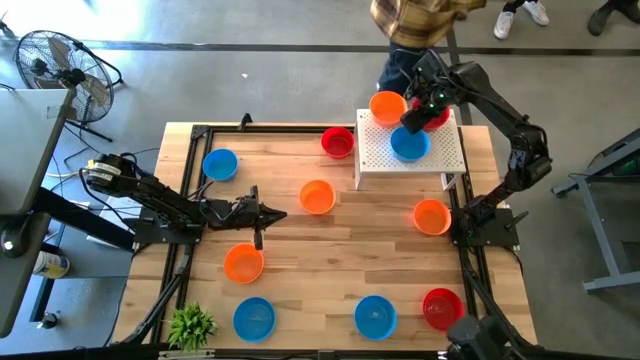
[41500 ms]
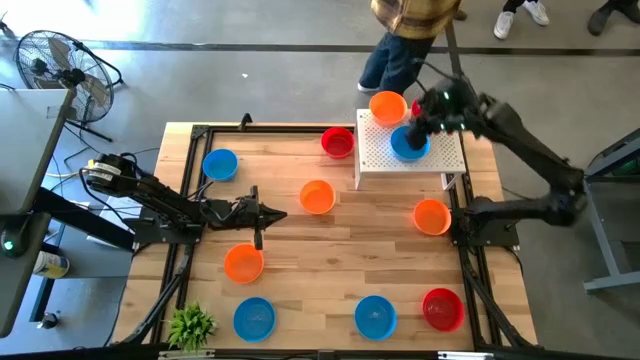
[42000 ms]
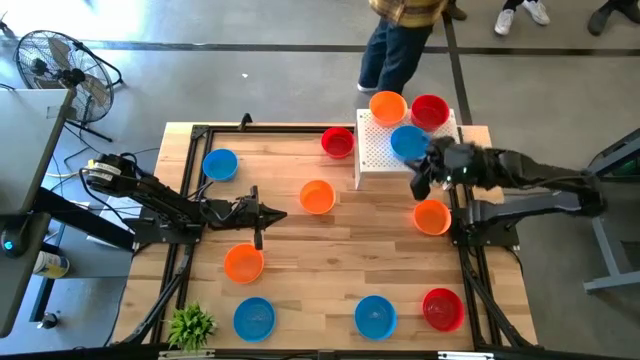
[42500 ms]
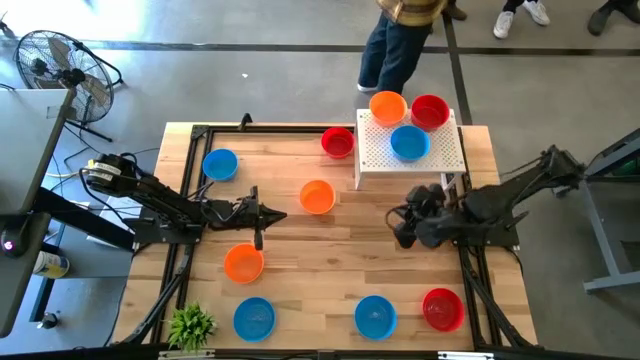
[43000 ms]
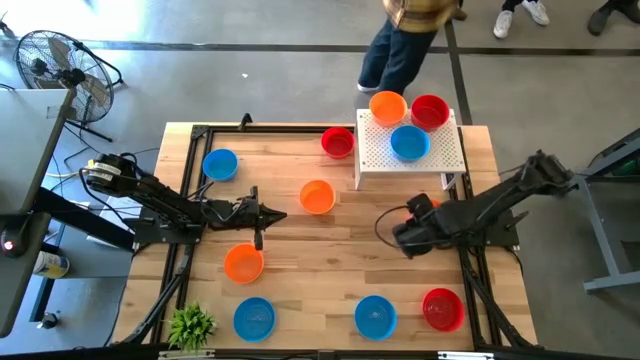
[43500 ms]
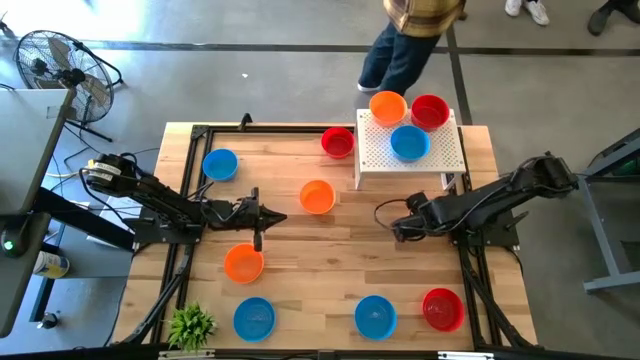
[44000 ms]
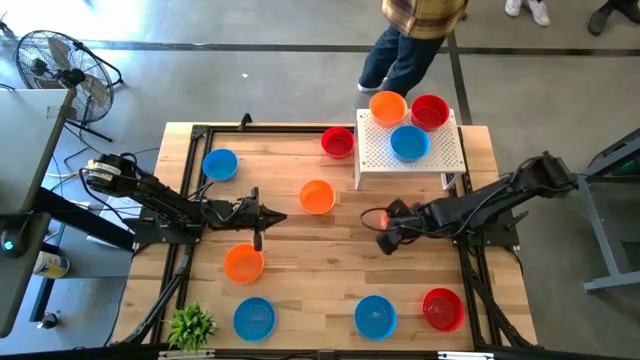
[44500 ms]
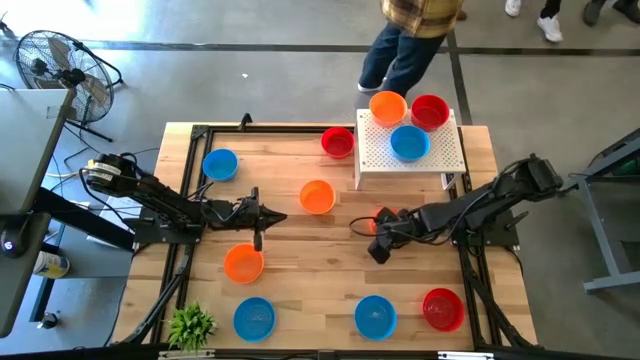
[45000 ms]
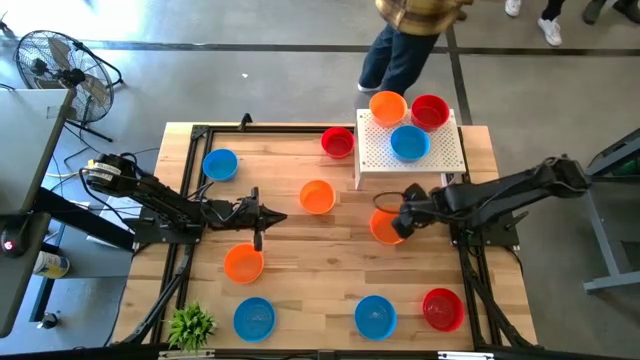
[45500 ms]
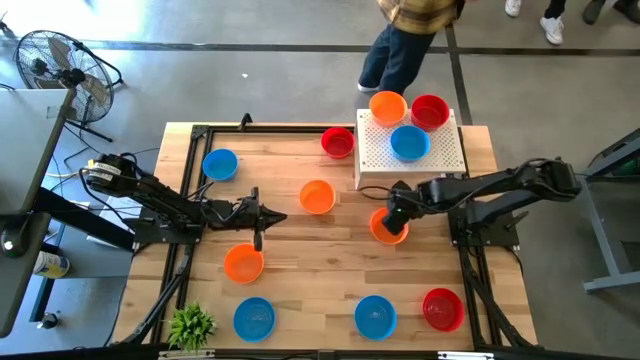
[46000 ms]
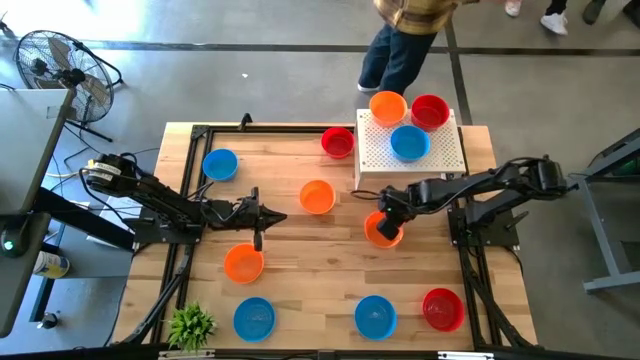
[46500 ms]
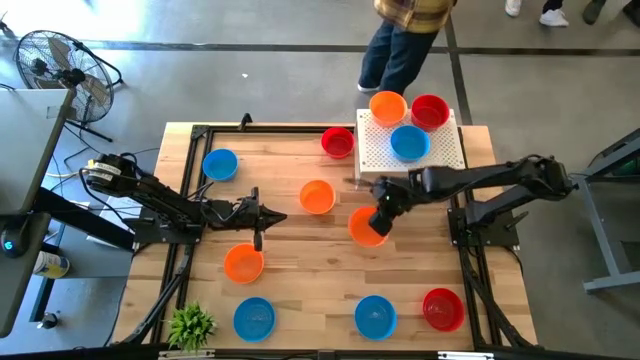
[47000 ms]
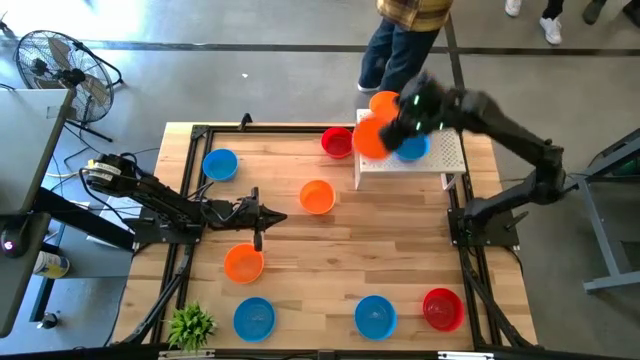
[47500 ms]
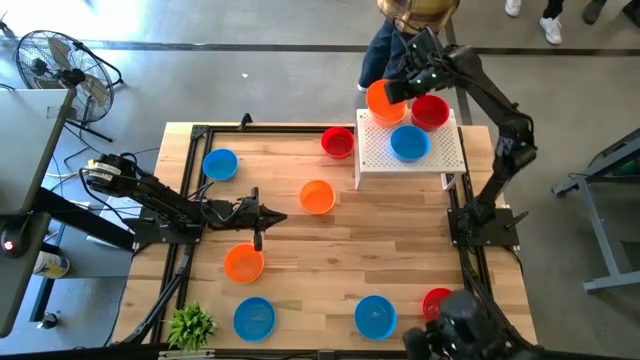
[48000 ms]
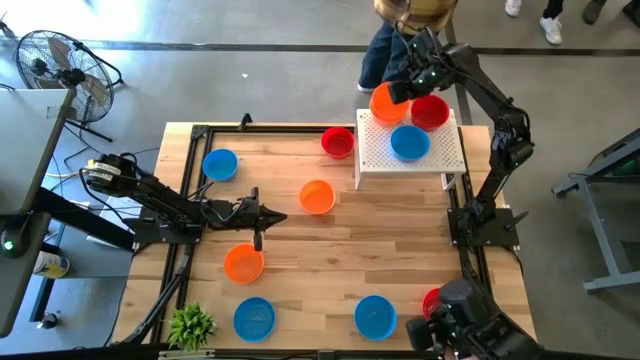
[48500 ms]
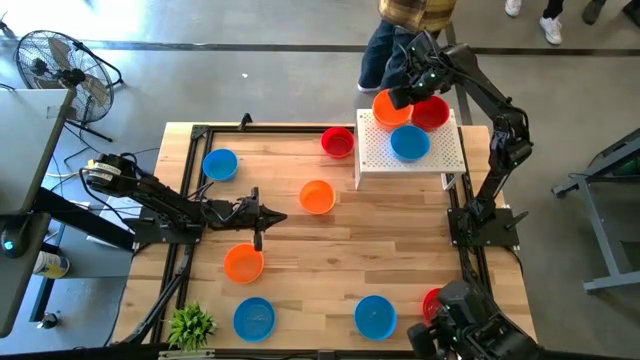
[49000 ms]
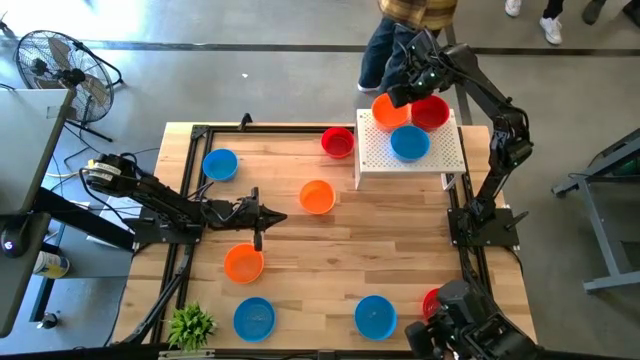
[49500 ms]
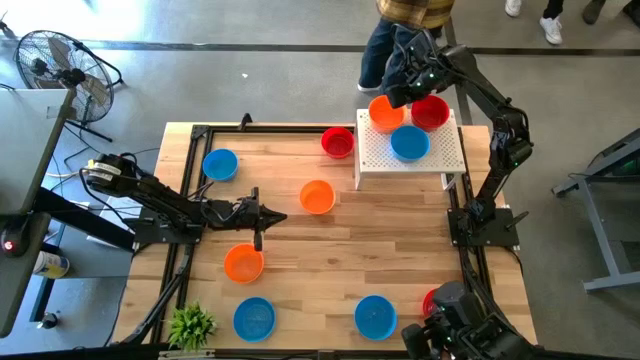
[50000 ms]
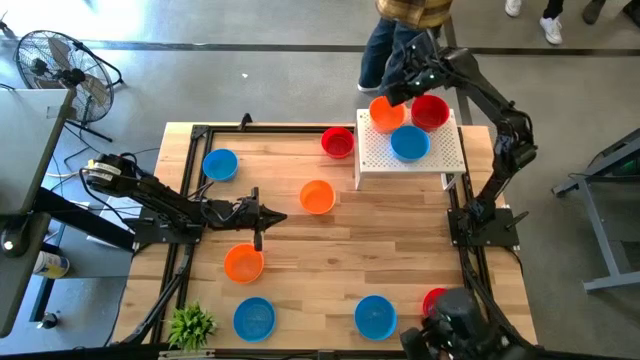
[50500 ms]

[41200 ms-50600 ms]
Task: Pick & Place Mini bowls
Stack the orange bowl on the orange bowl on the shelf

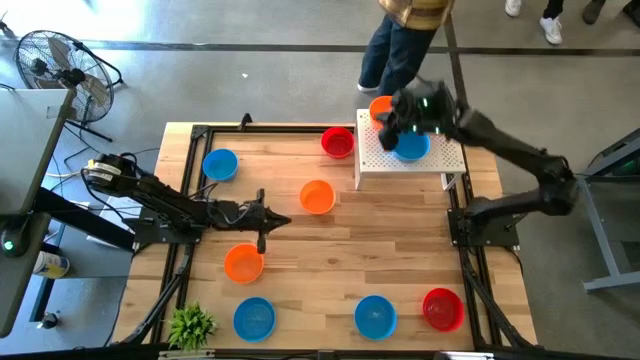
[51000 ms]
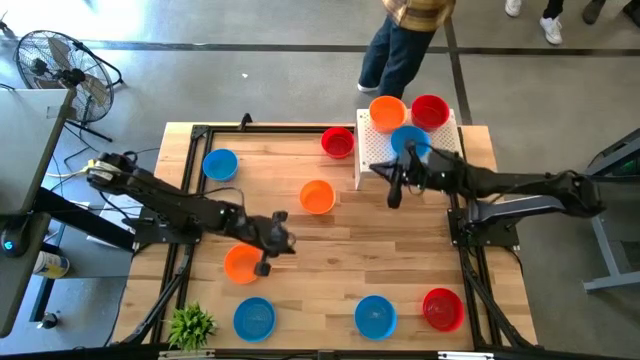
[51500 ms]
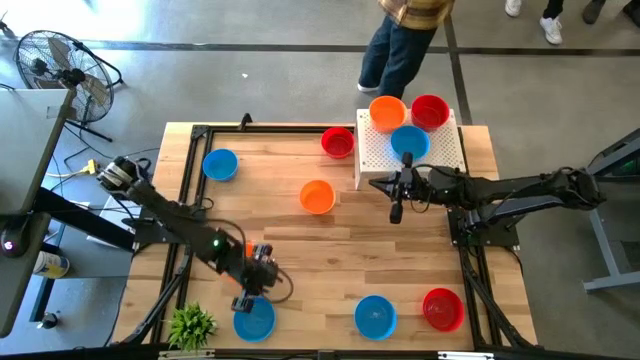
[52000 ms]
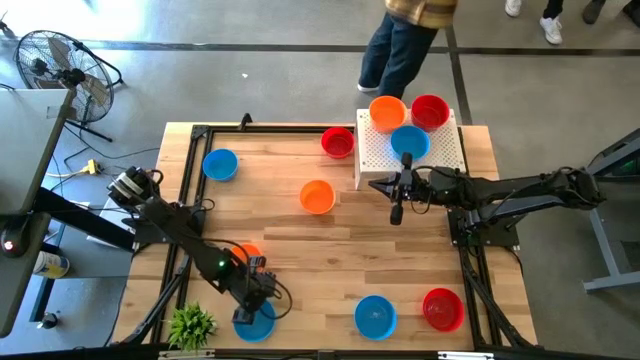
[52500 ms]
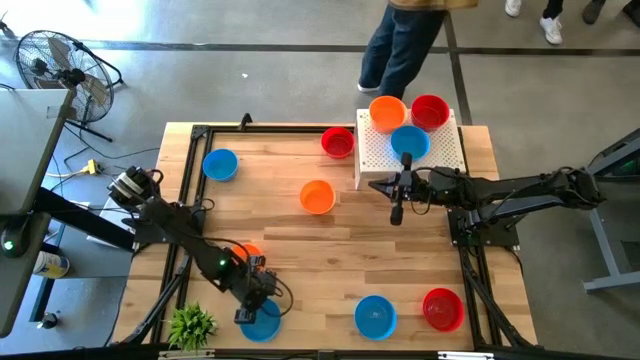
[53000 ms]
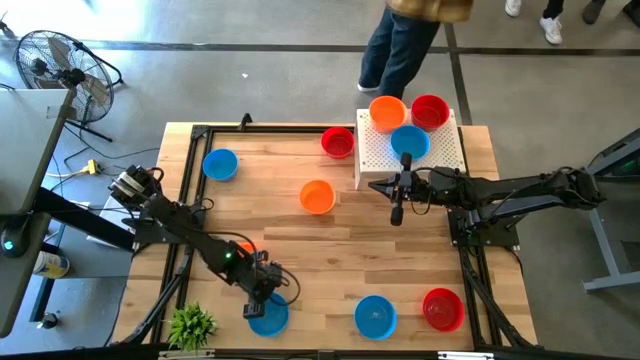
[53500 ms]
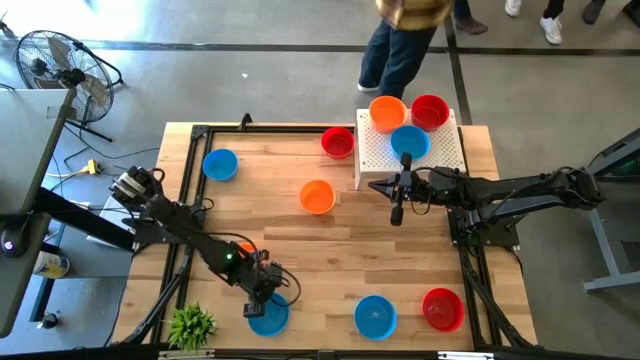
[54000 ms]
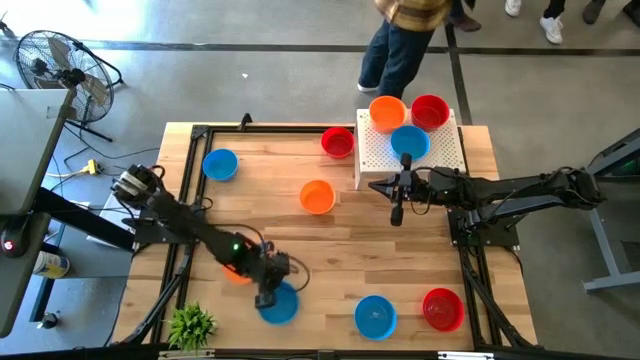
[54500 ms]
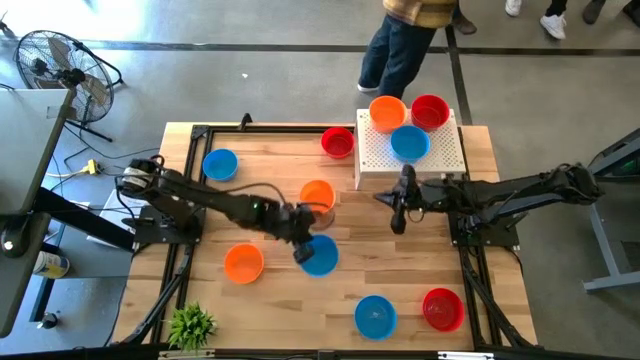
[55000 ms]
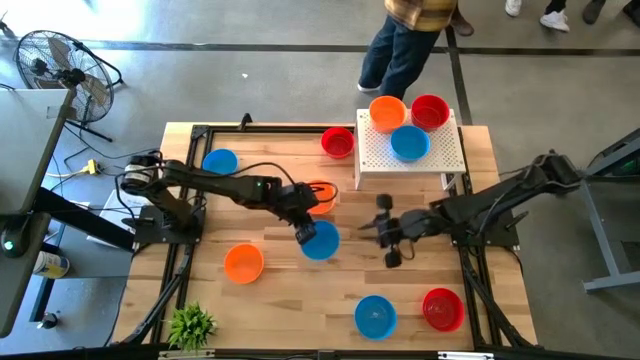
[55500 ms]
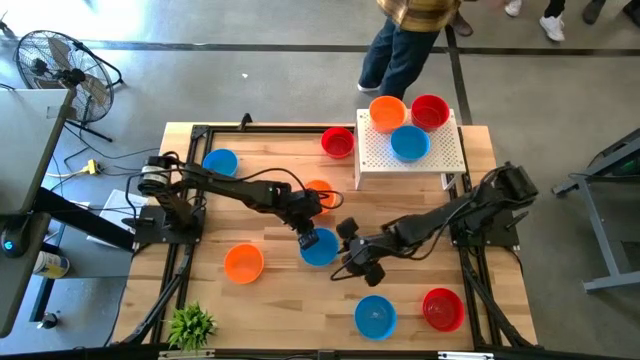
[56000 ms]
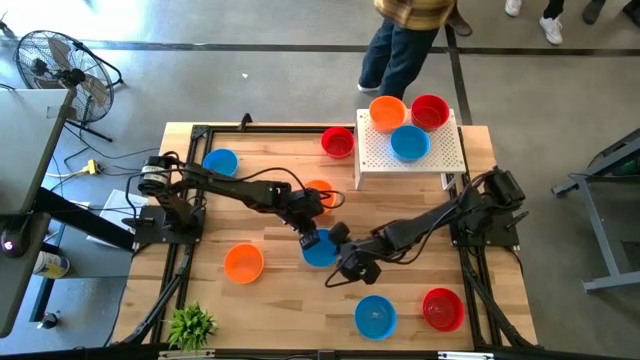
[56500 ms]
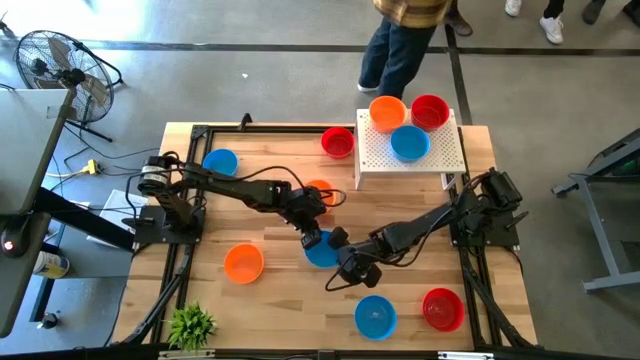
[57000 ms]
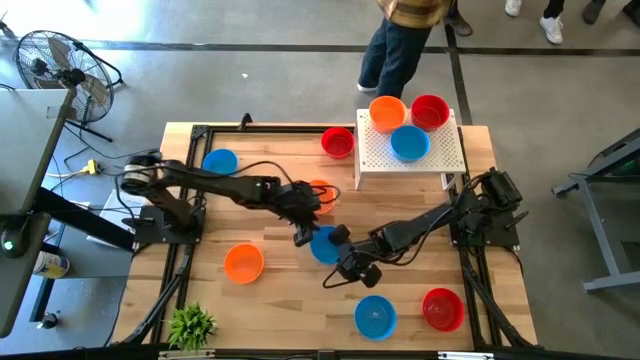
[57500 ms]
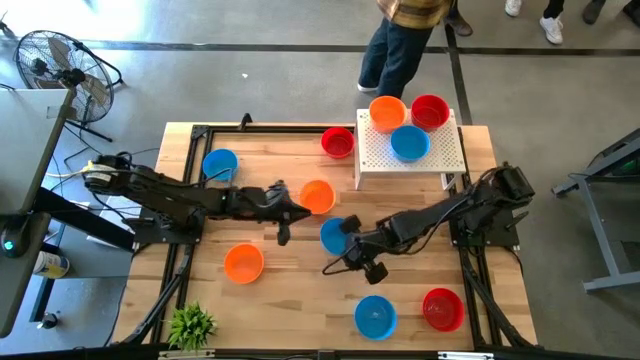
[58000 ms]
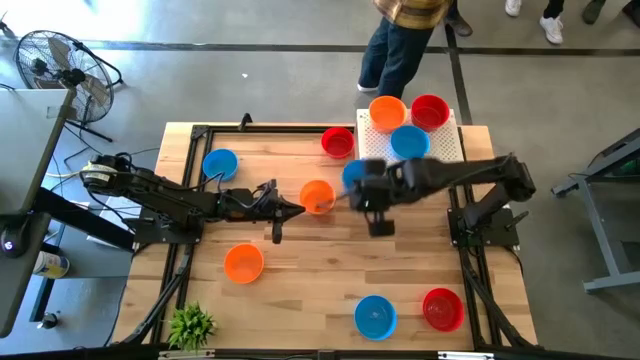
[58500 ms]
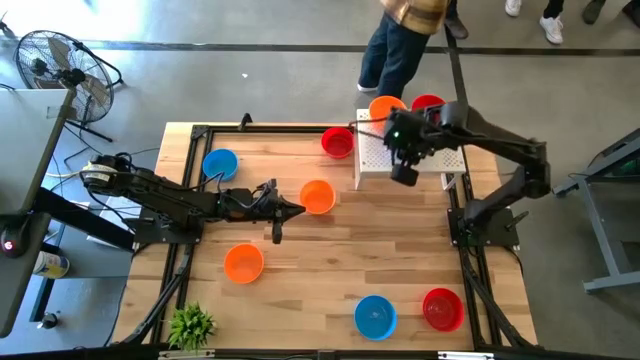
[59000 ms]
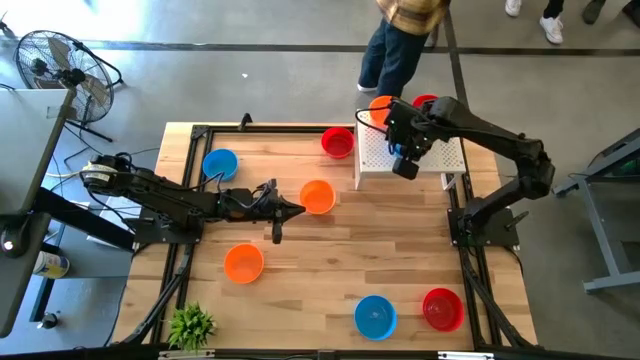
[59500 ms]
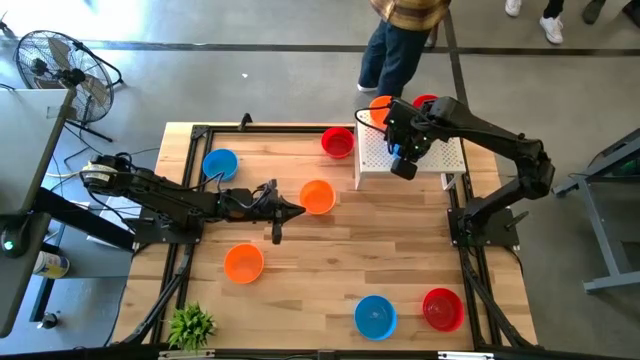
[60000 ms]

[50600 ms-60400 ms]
Stack the blue bowl on the blue bowl on the shelf

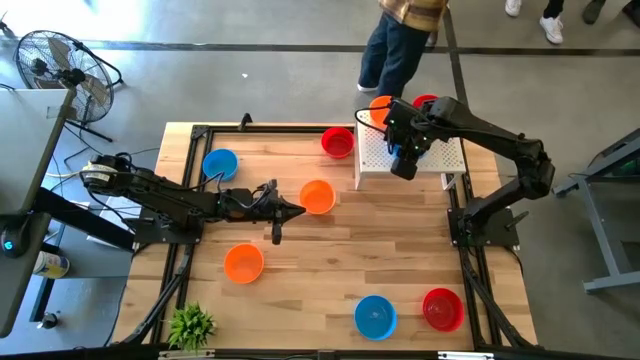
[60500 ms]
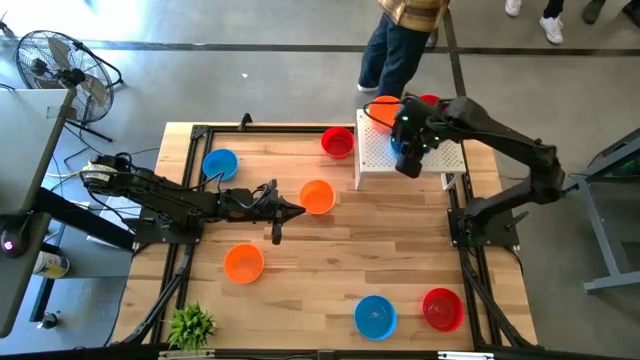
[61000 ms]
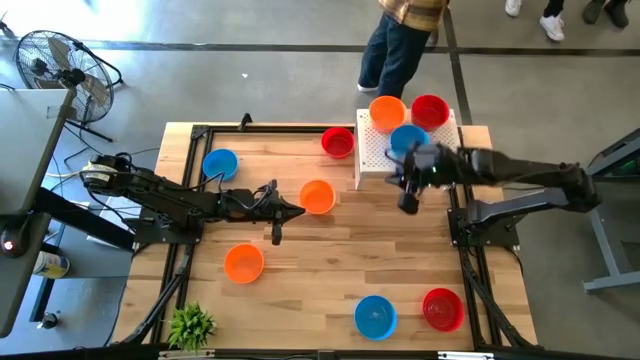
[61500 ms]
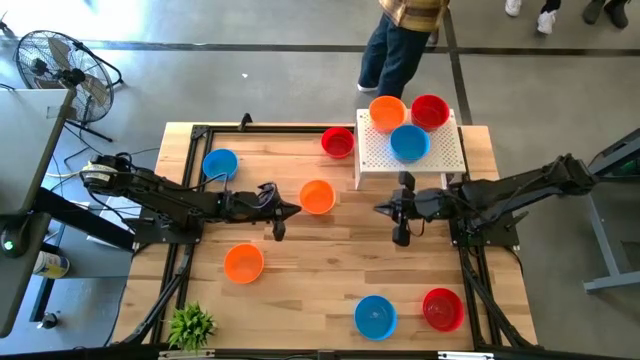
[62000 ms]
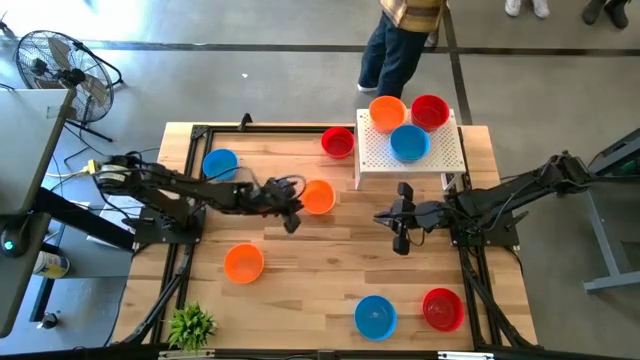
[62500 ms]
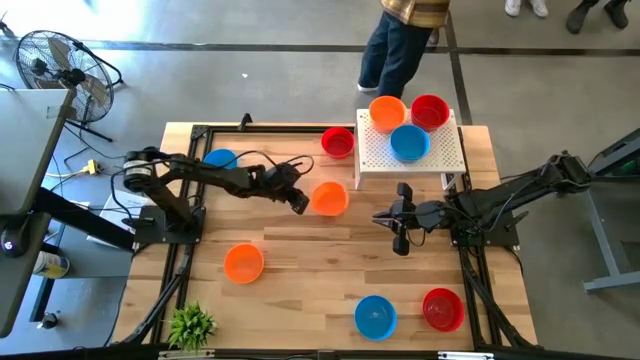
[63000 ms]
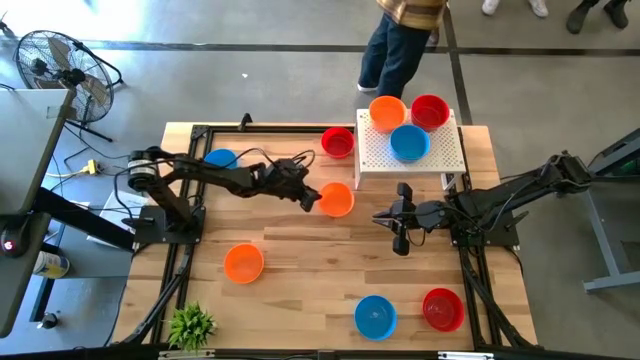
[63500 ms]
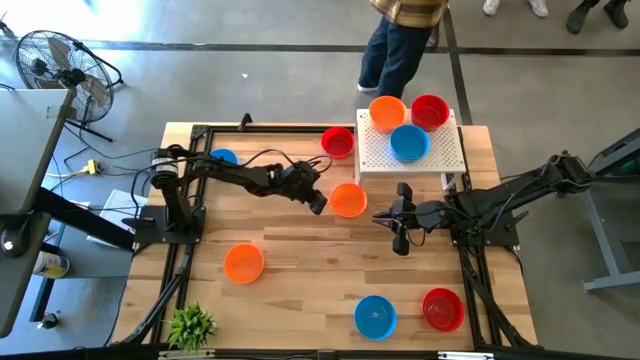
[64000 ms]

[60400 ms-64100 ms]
Stack the orange bowl on the stacked orange bowls on the shelf
